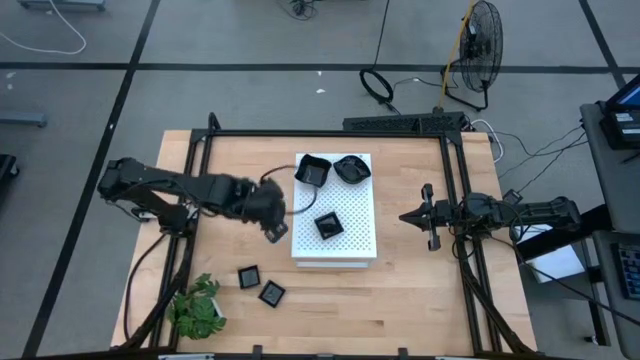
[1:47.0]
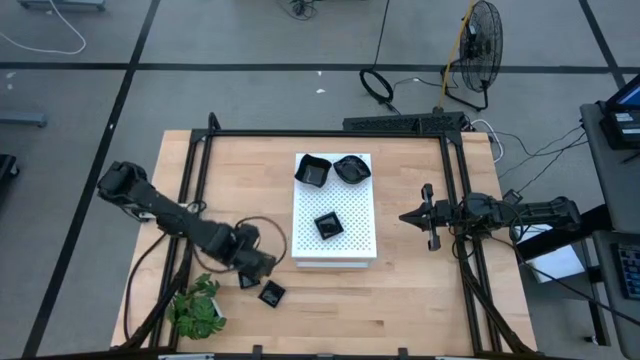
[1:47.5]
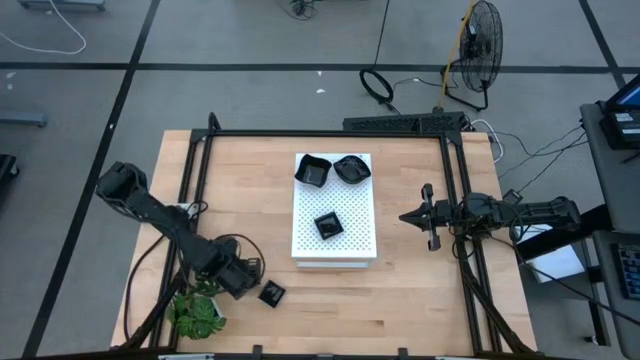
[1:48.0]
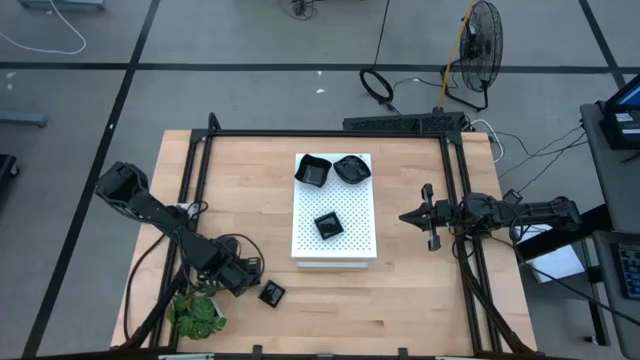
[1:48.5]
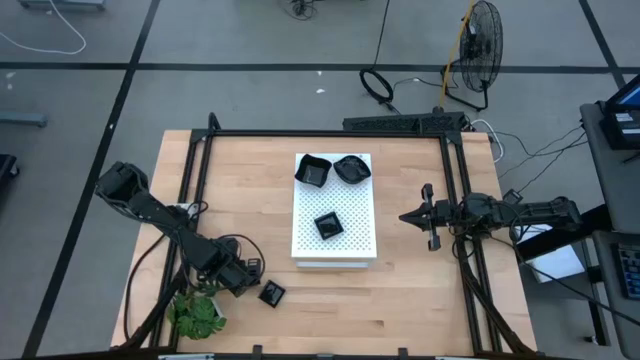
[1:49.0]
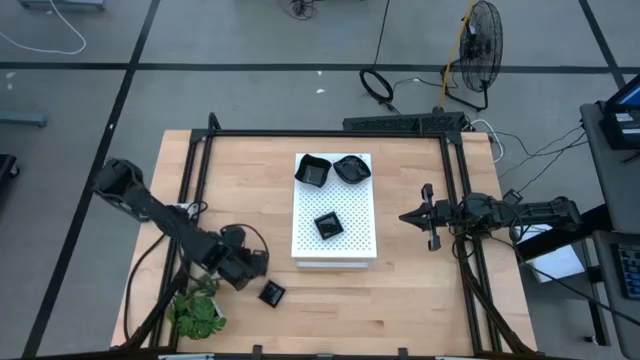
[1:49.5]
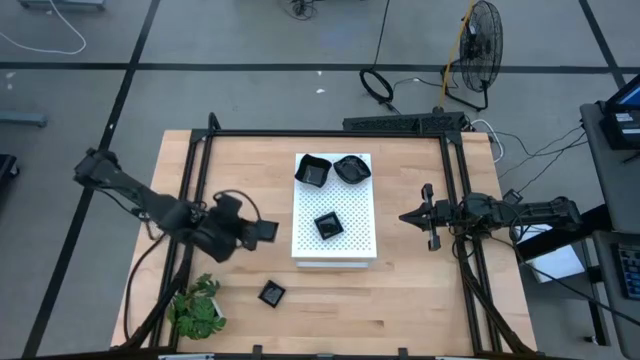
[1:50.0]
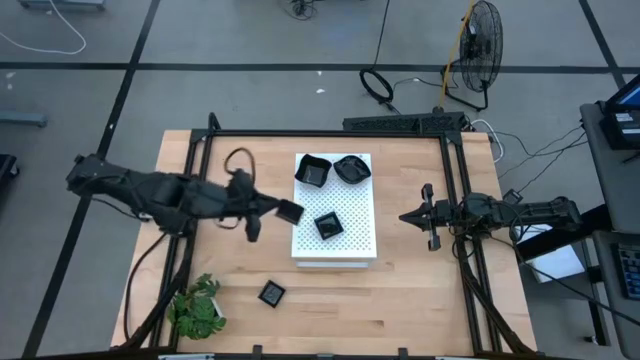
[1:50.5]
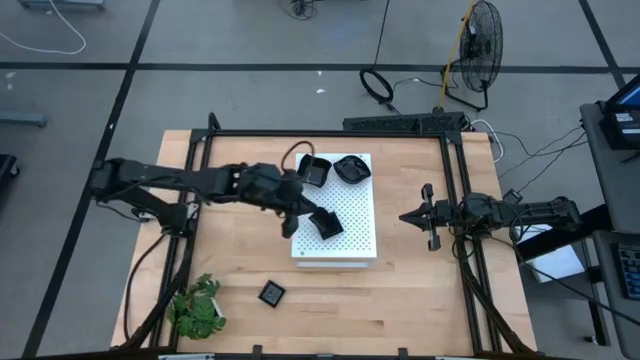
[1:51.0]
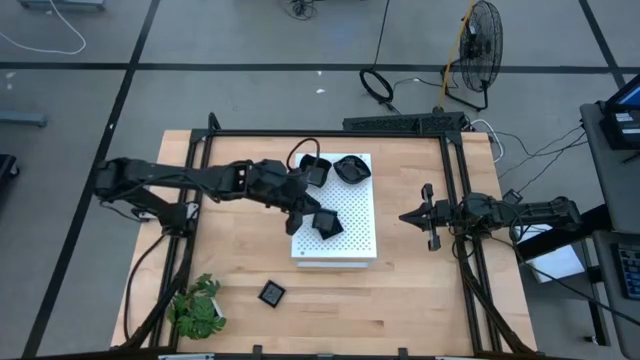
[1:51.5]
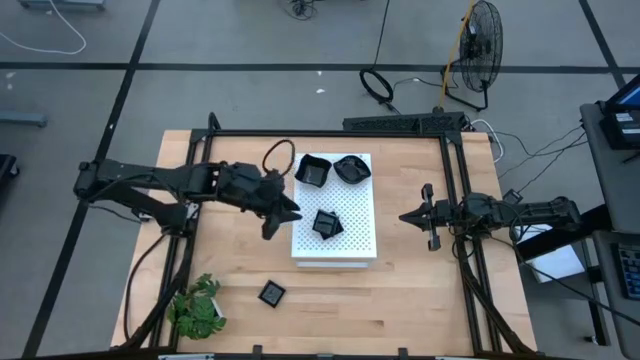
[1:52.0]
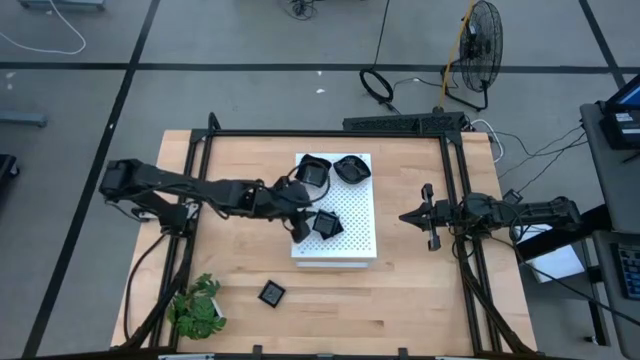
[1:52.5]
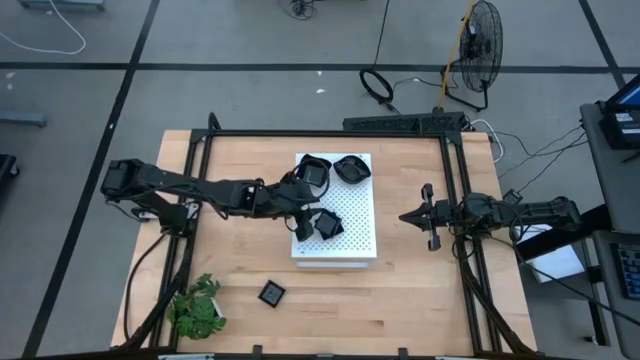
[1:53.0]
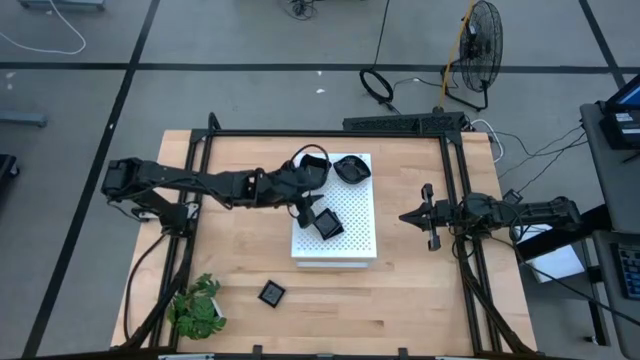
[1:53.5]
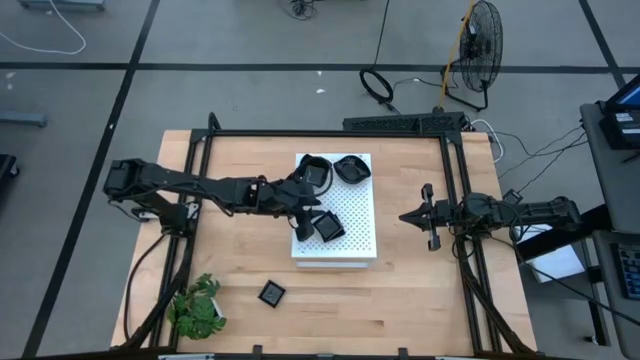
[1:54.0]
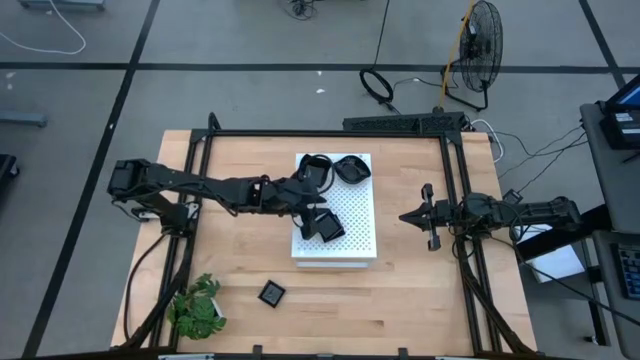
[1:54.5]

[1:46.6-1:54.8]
Task: Pick & Place Mini shaped plates
Stack the black square plate on top of the other black square plates on the shelf

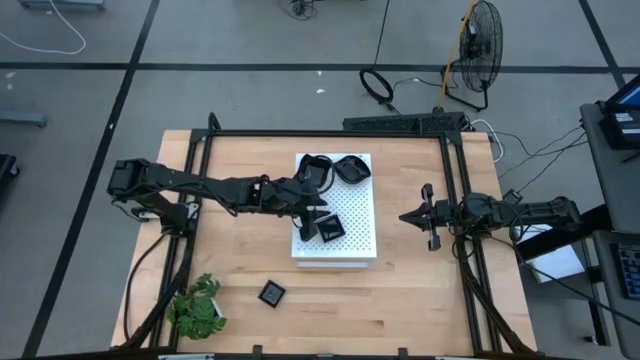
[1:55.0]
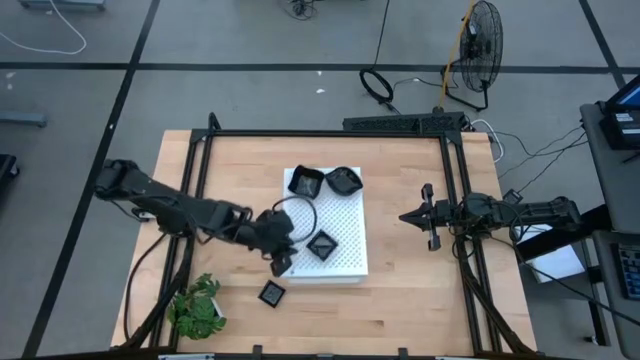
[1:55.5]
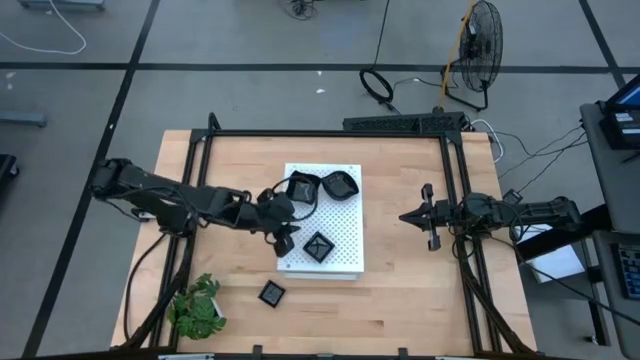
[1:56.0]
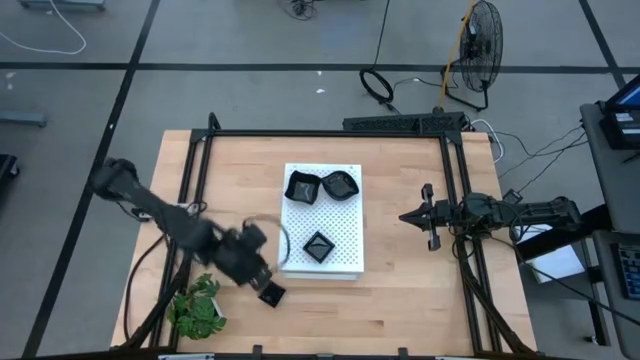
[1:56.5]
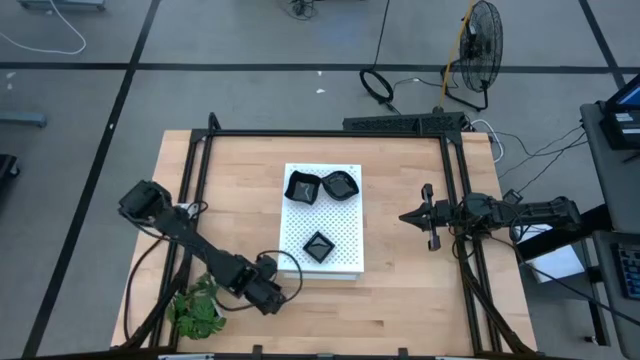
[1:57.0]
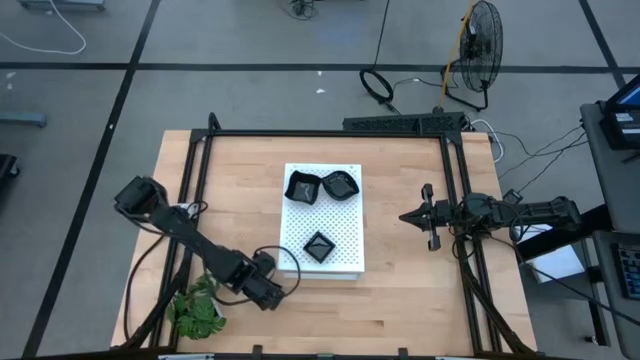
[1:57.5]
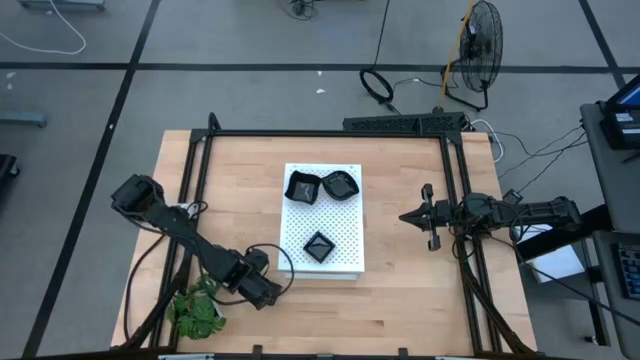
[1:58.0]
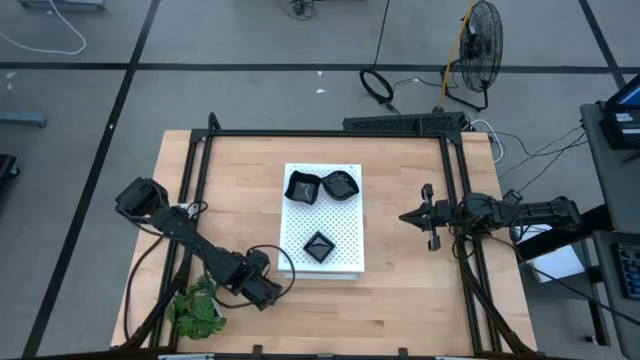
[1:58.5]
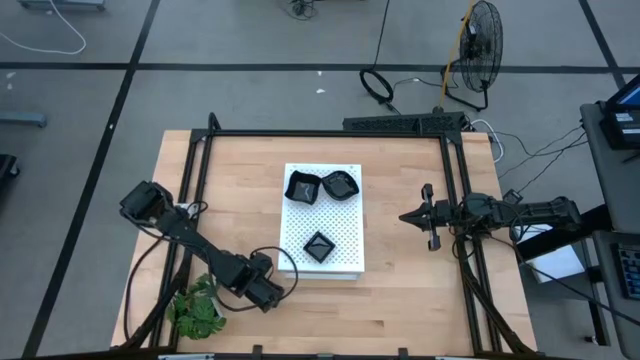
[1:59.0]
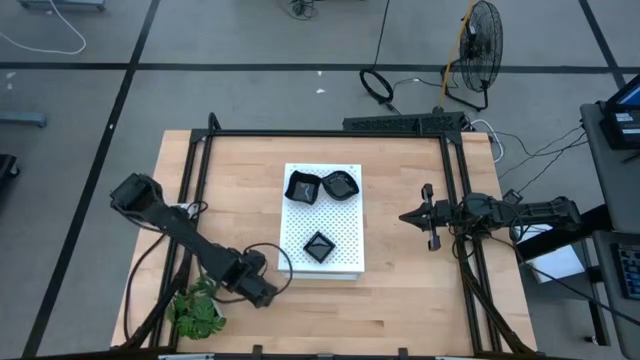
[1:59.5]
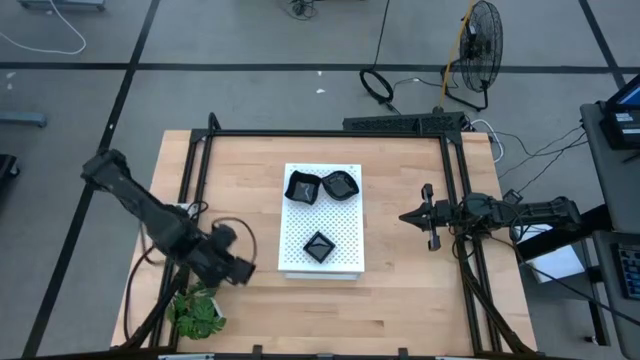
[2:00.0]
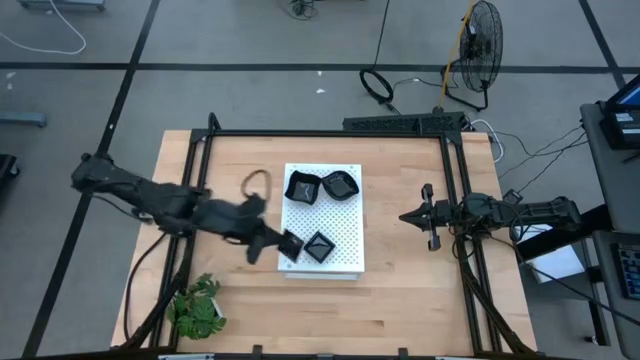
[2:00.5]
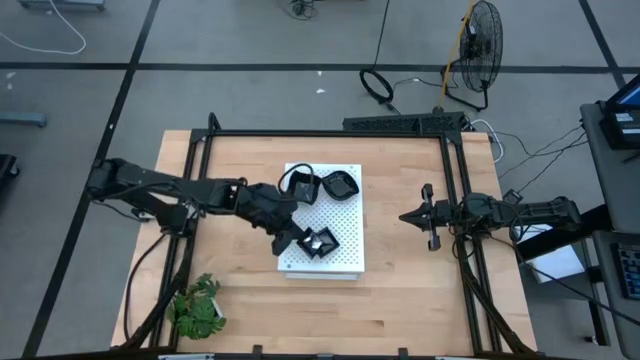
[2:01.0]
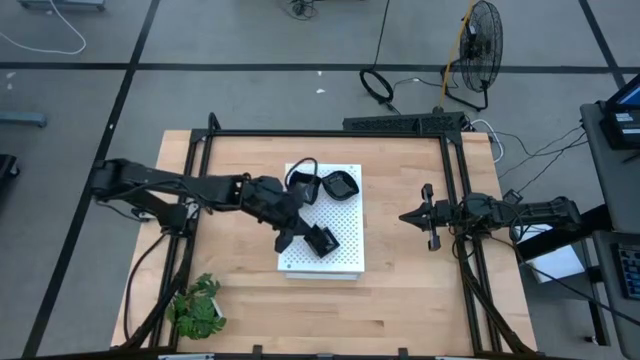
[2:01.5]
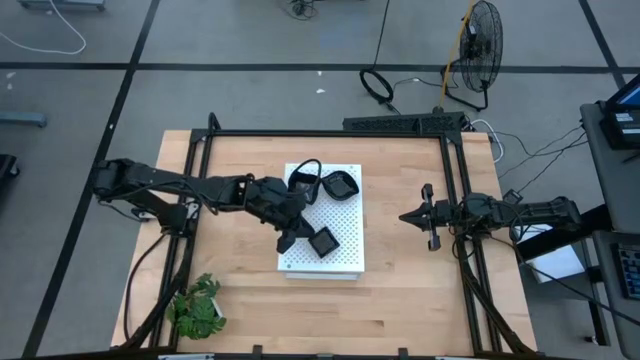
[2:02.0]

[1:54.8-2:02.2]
Stack the black square plate on top of the other black square plates on the shelf

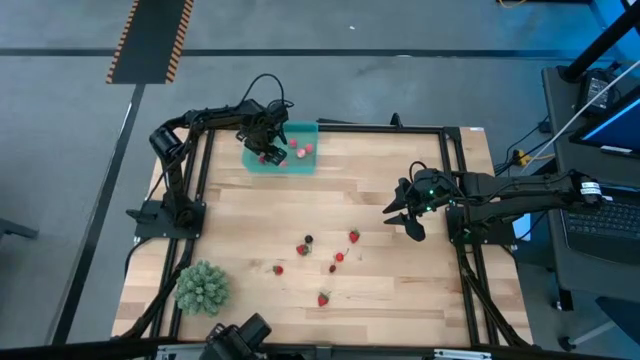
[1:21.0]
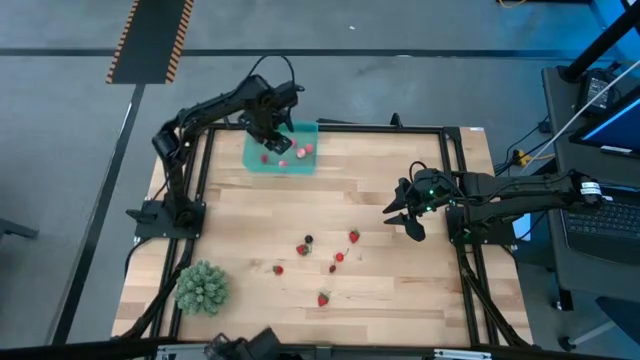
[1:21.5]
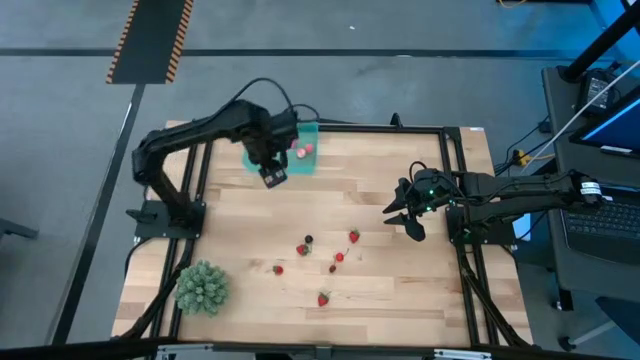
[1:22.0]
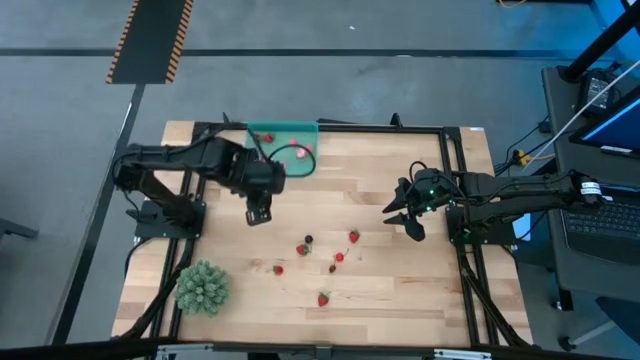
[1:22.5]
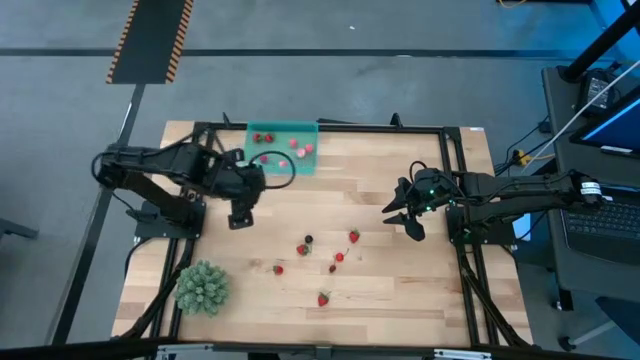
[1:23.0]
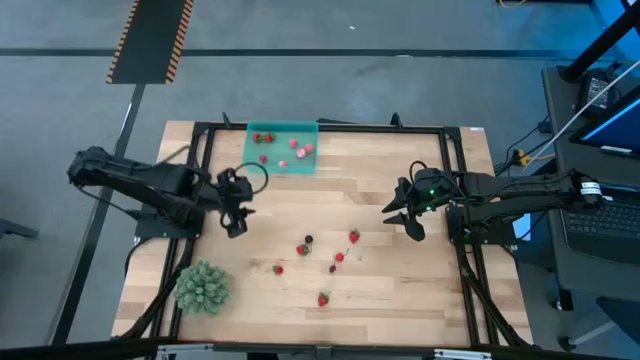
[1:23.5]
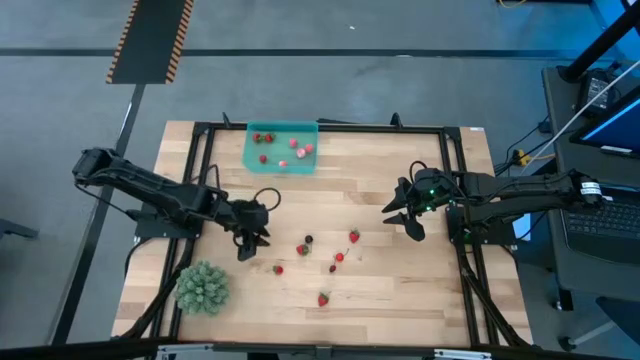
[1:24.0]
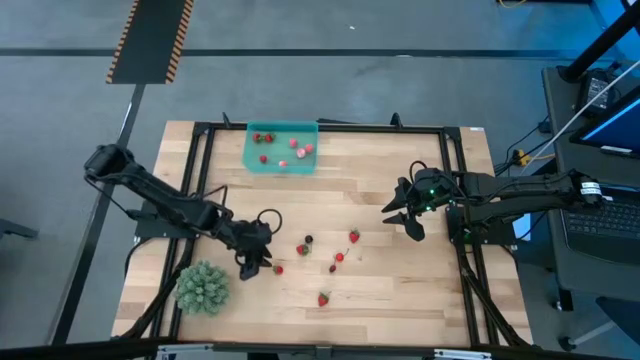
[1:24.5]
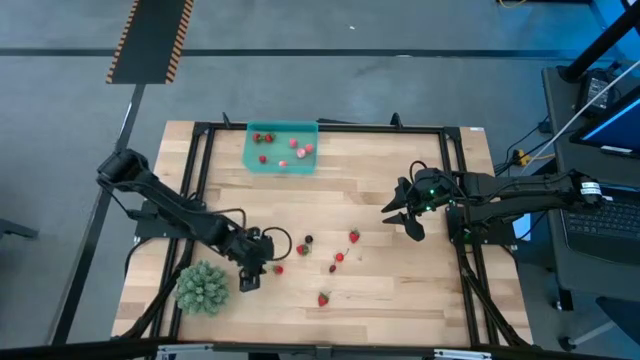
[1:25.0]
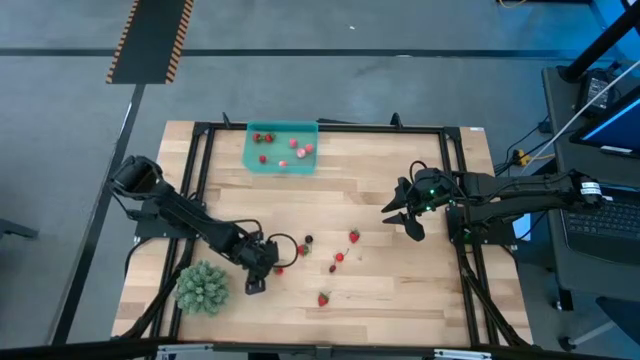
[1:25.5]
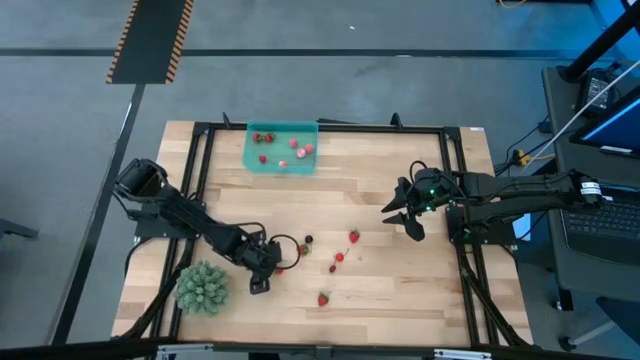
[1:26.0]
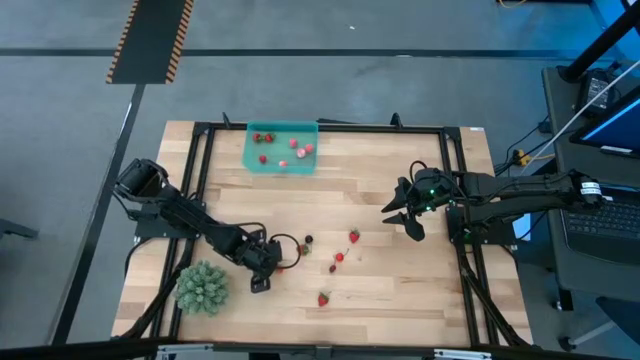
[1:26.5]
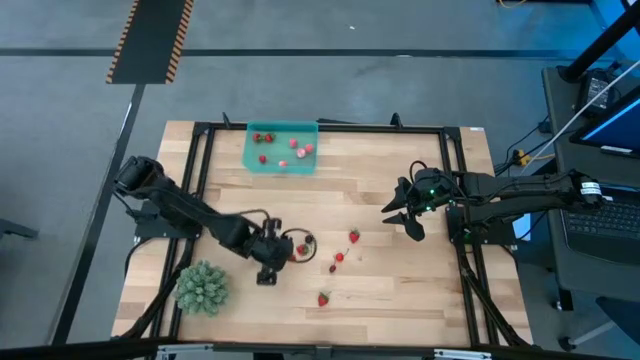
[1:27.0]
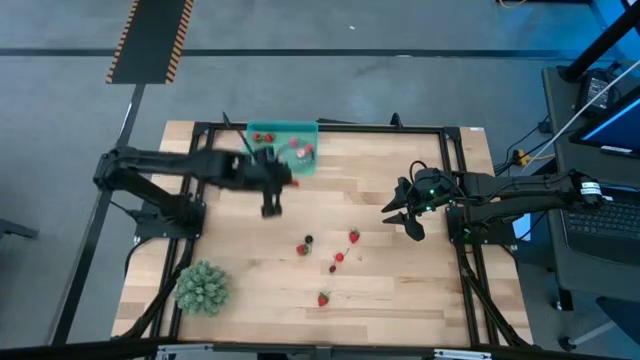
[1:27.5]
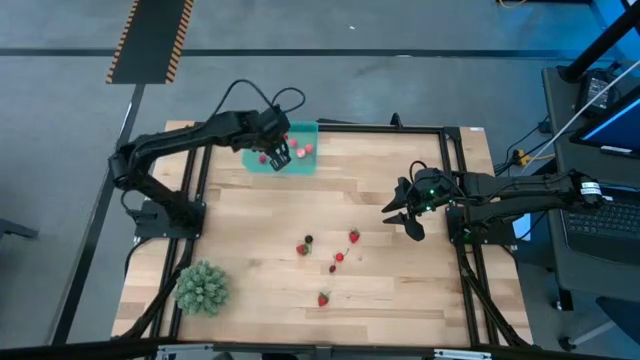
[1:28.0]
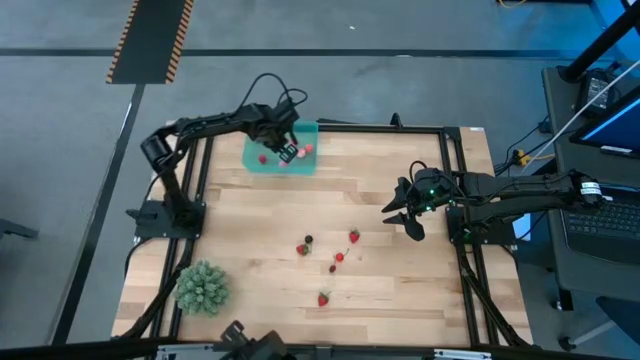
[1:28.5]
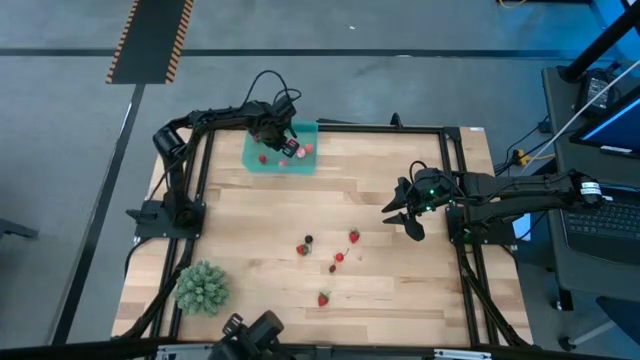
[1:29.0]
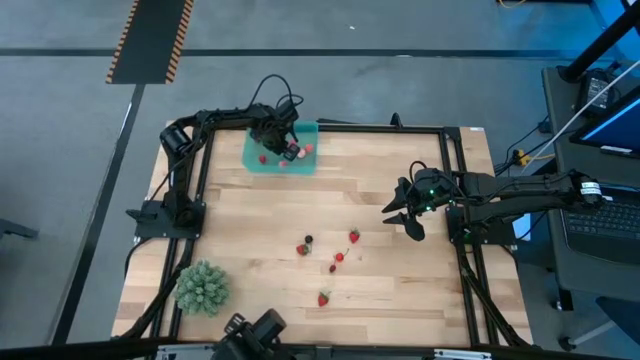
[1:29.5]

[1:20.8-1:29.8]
Task: Pick and placing Produce into tupperware
Put the red strawberry into the blue bin
